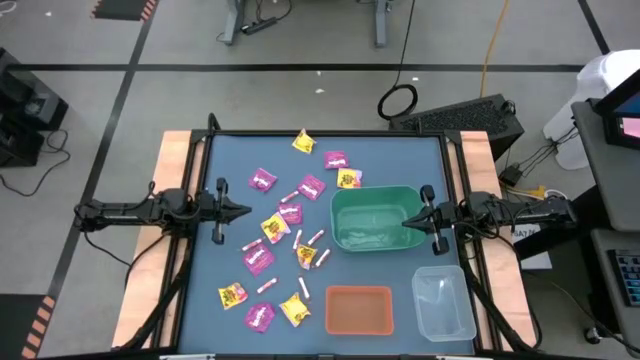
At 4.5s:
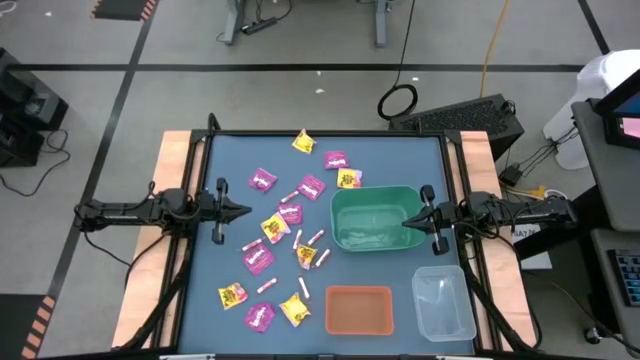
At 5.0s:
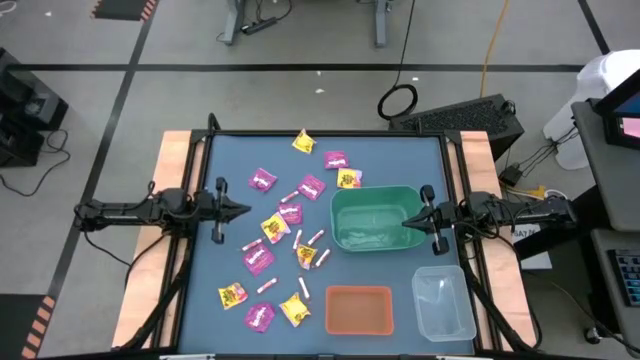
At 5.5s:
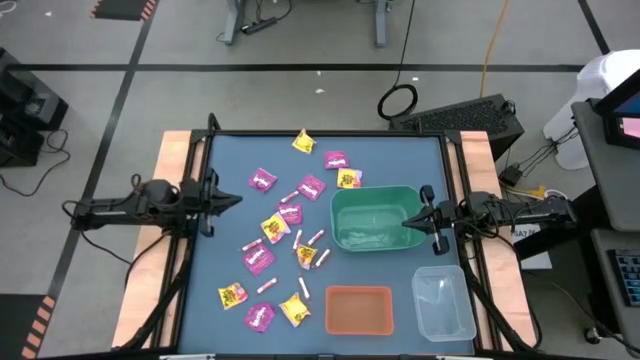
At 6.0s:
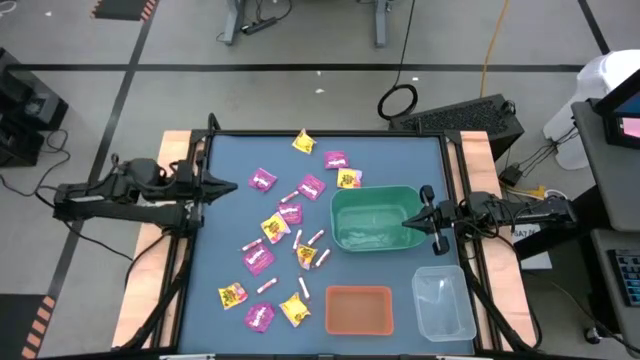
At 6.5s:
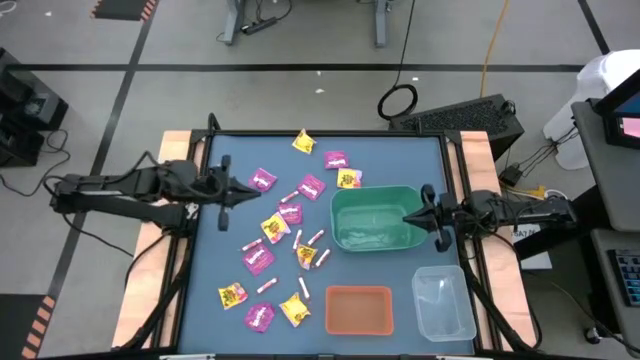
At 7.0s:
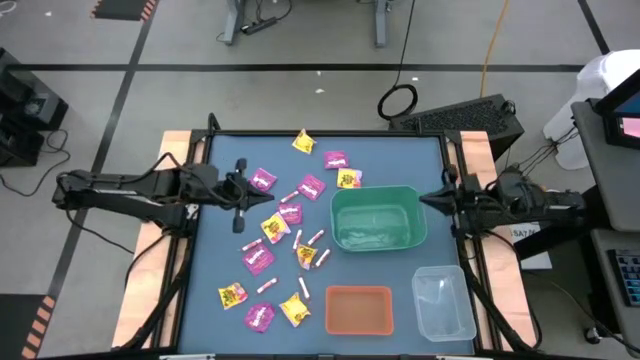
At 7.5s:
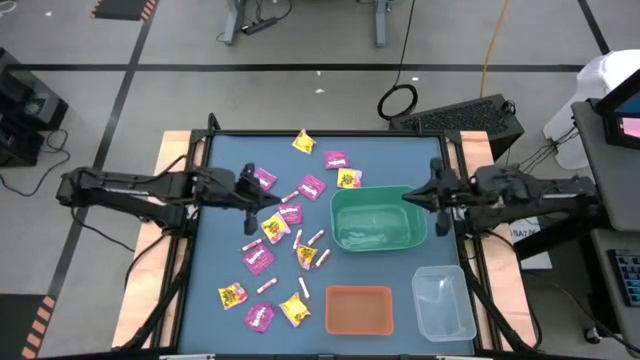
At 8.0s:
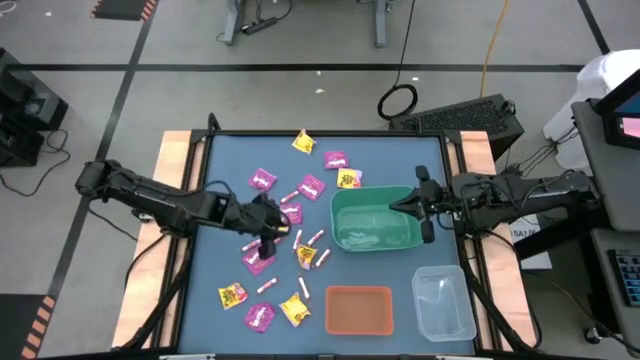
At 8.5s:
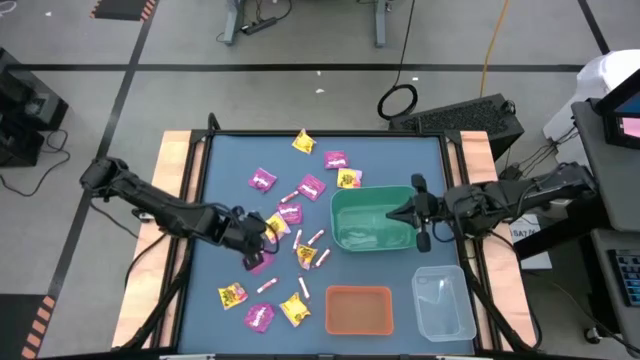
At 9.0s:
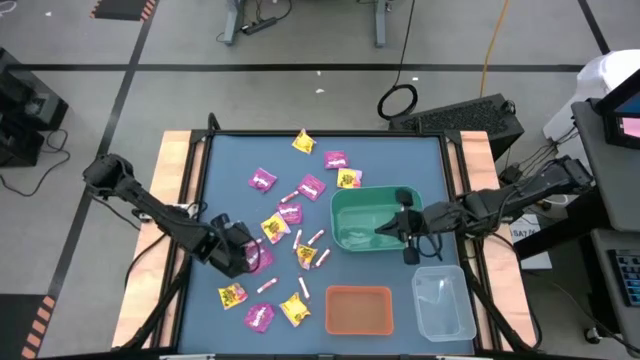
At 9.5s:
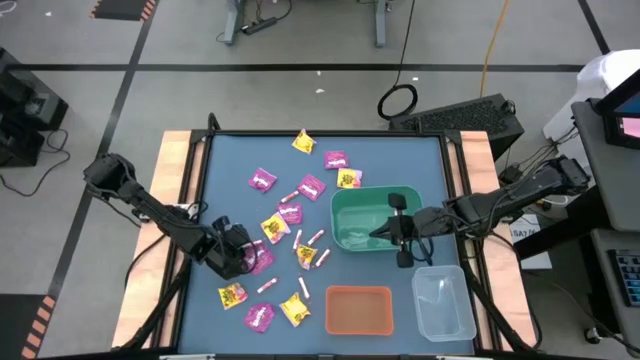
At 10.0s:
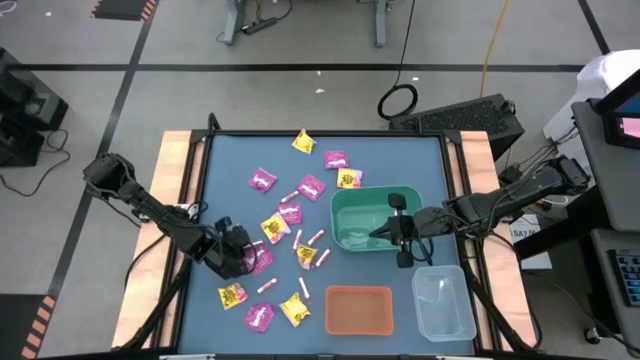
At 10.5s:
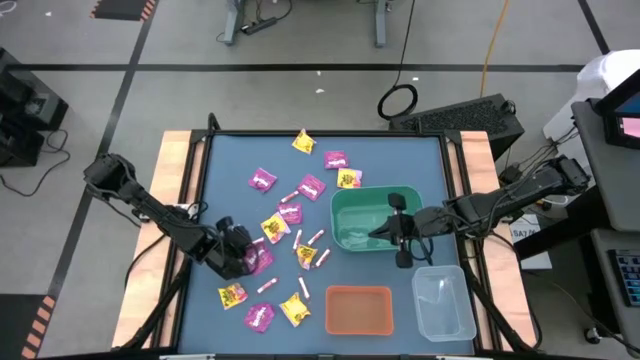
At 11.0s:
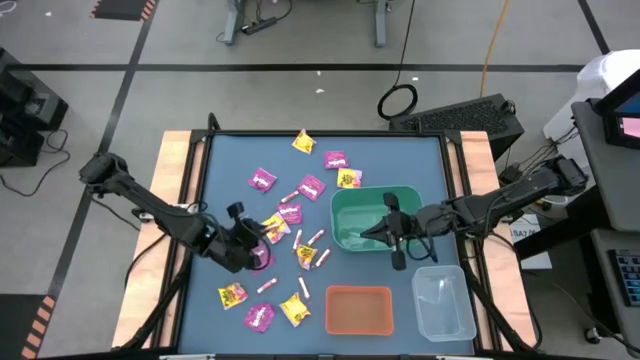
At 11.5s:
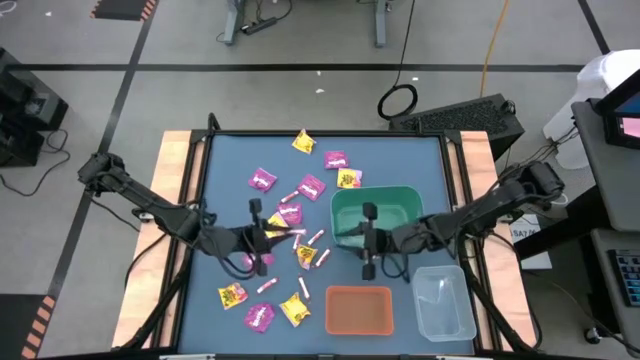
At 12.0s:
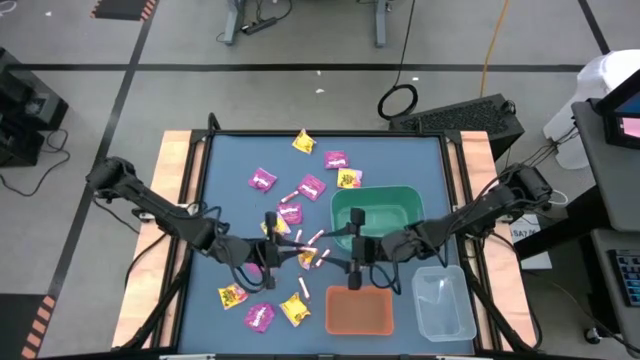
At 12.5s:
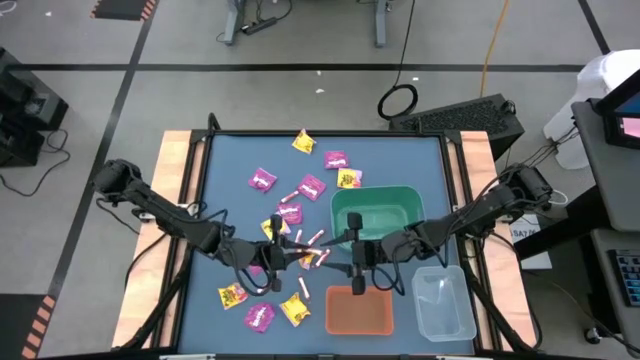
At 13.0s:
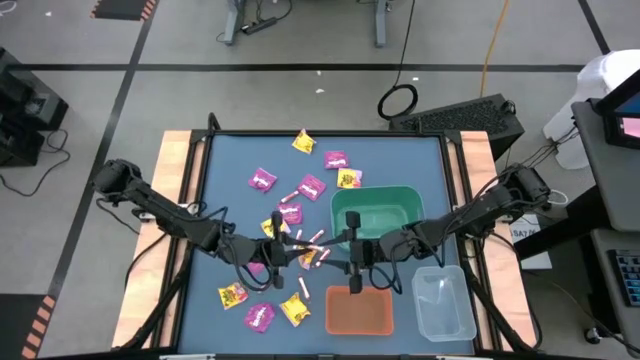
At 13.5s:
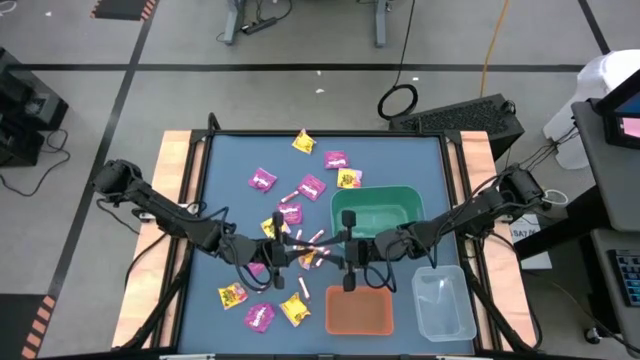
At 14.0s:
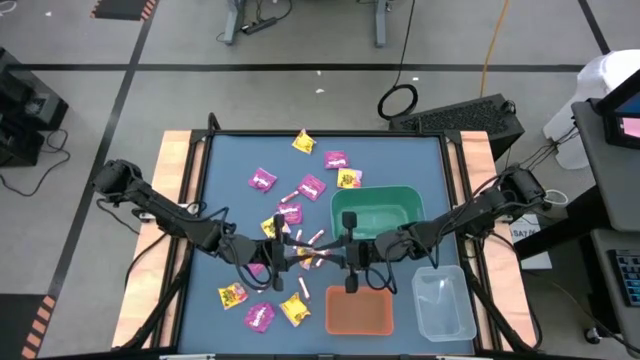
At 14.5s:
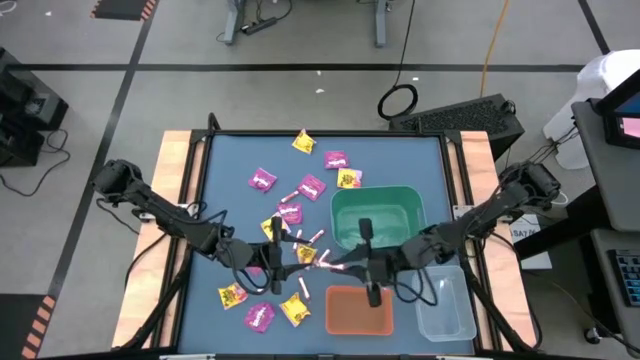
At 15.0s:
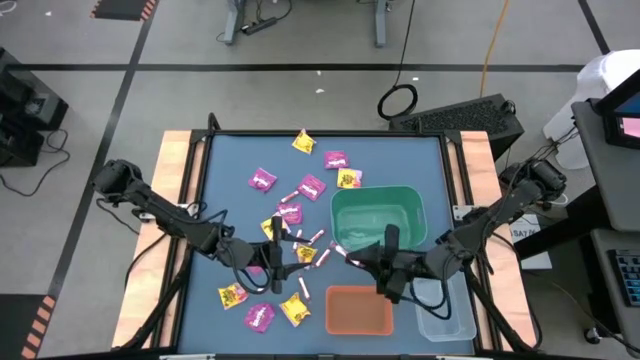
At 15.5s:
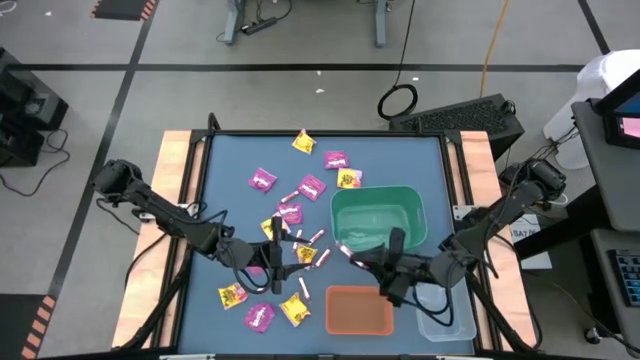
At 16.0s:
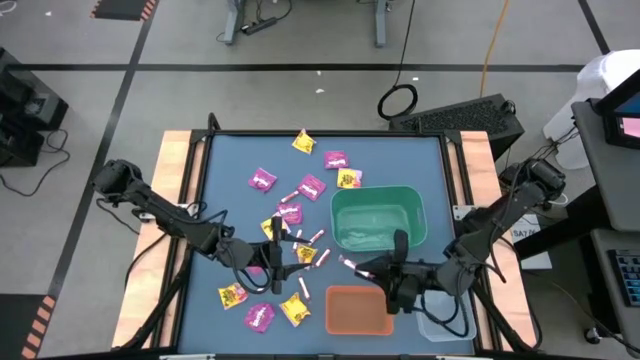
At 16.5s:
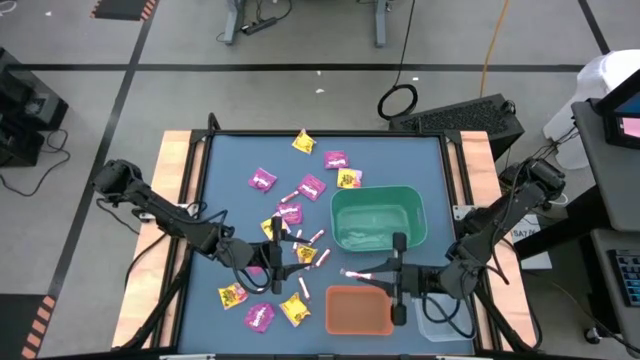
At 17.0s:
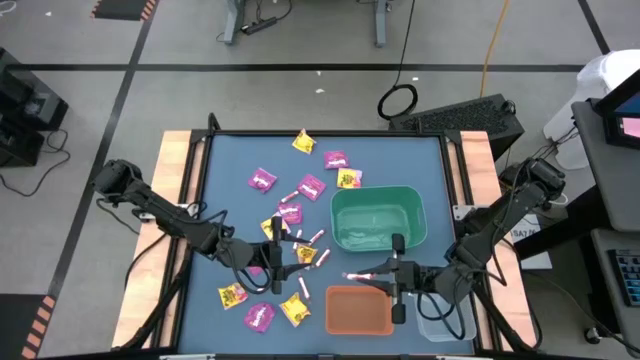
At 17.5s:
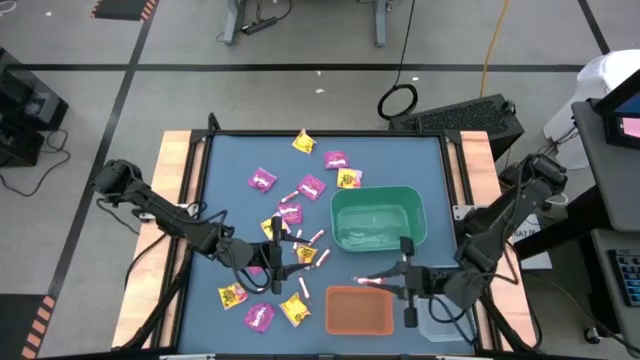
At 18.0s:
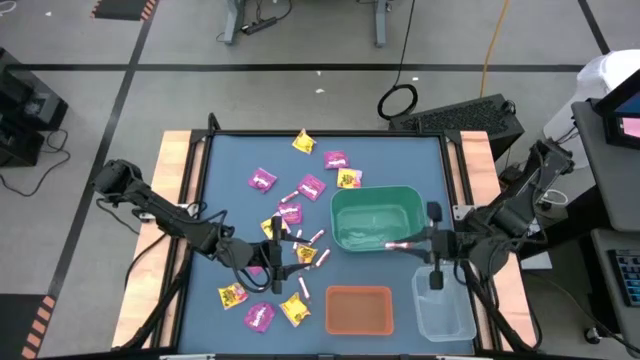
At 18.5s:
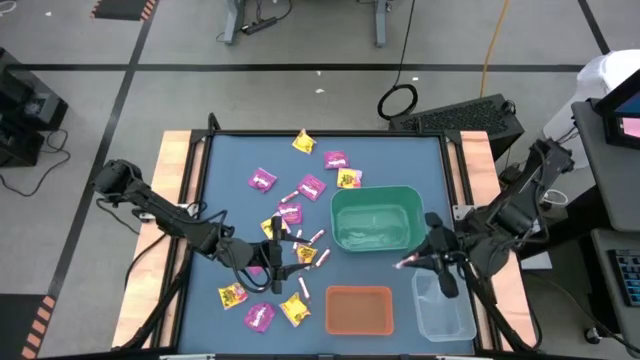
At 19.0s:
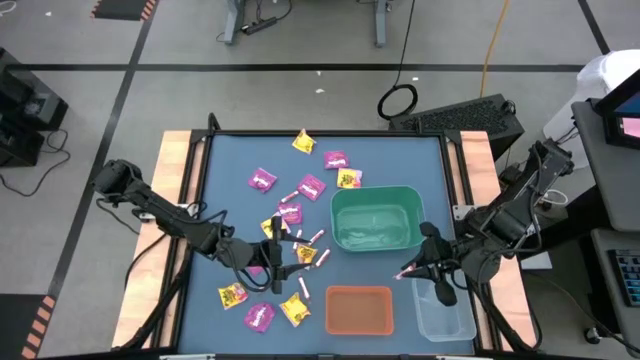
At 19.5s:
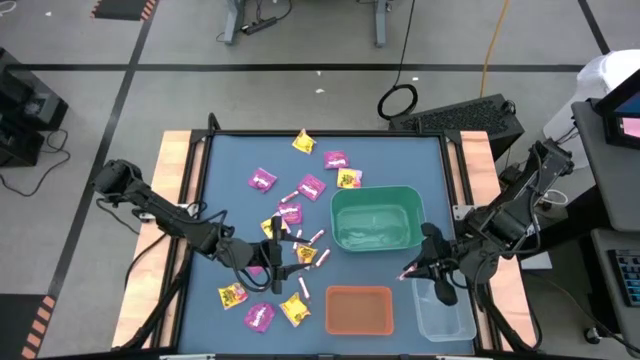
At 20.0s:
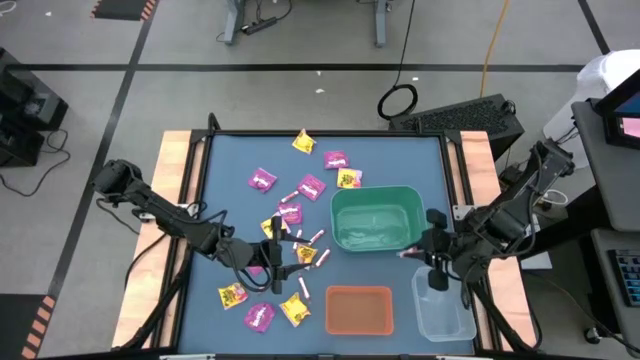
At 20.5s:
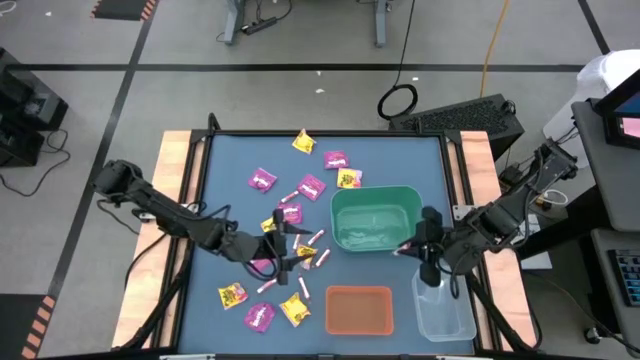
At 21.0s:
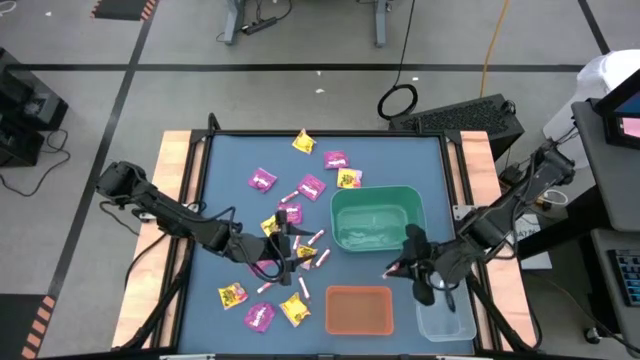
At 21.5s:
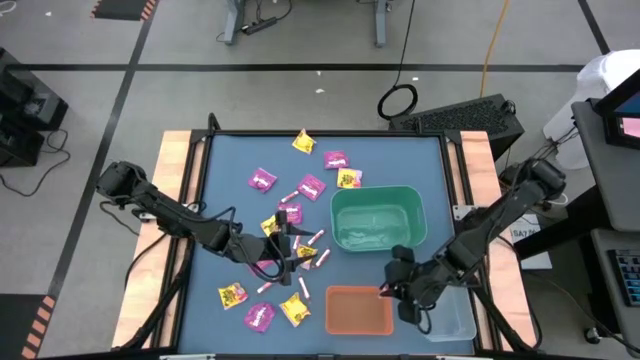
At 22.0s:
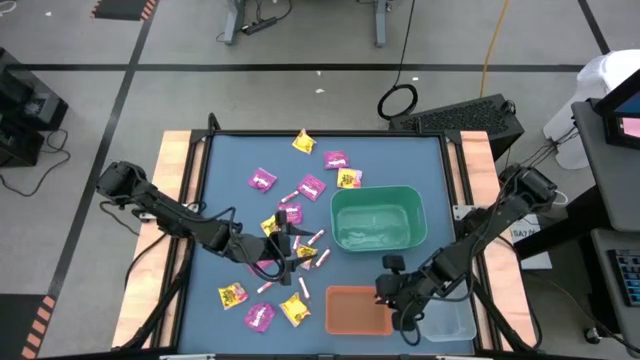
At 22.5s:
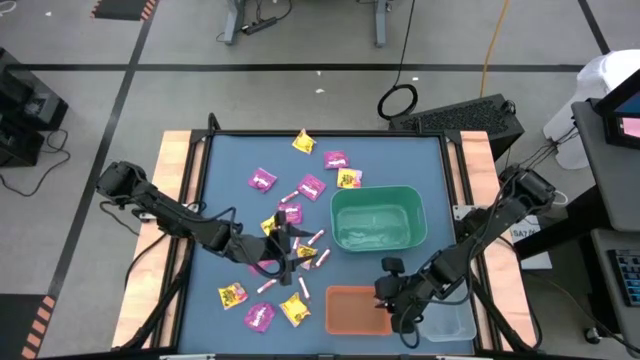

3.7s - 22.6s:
Task: Sort candy
Put the white candy into the orange bin
